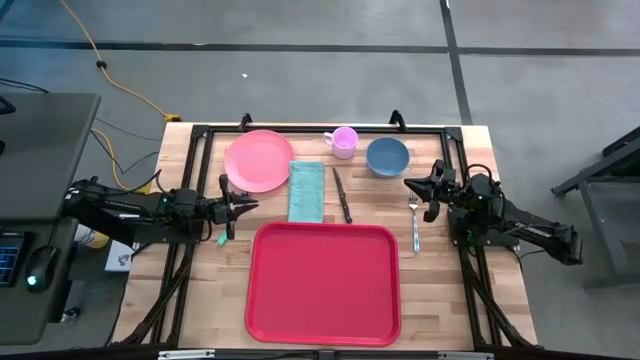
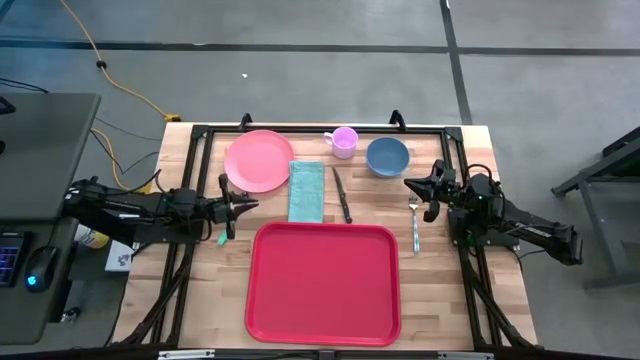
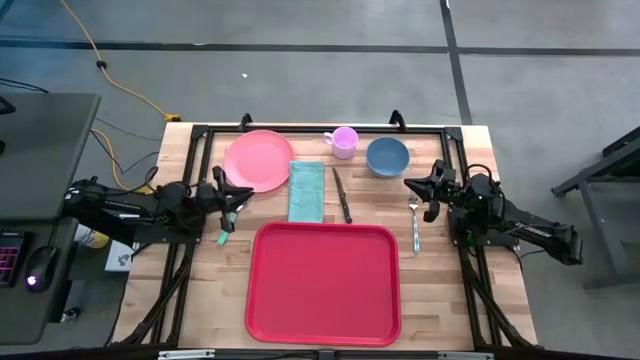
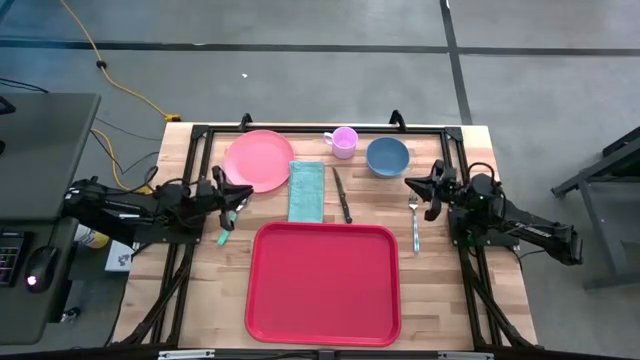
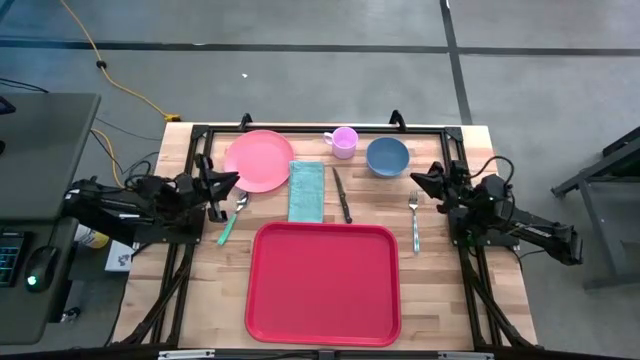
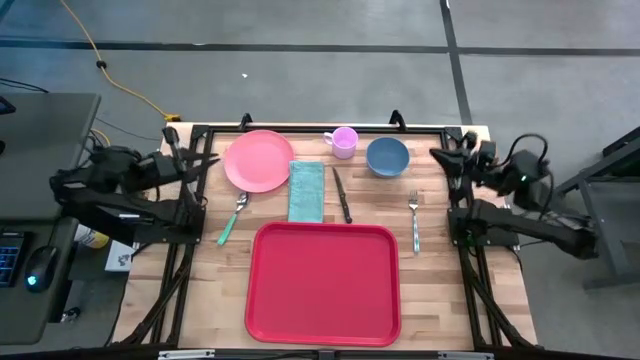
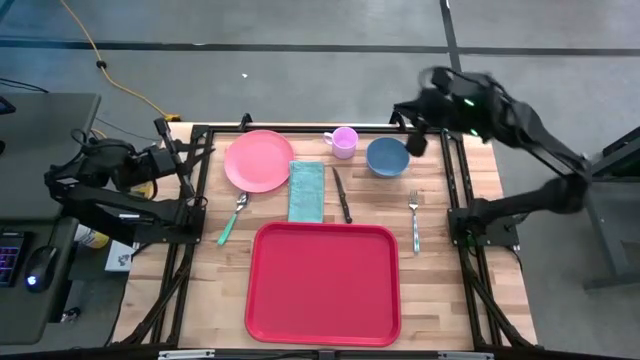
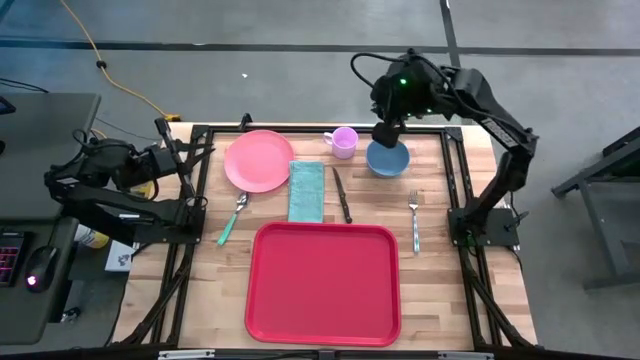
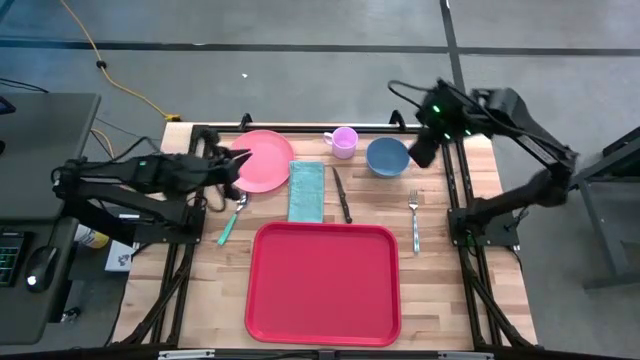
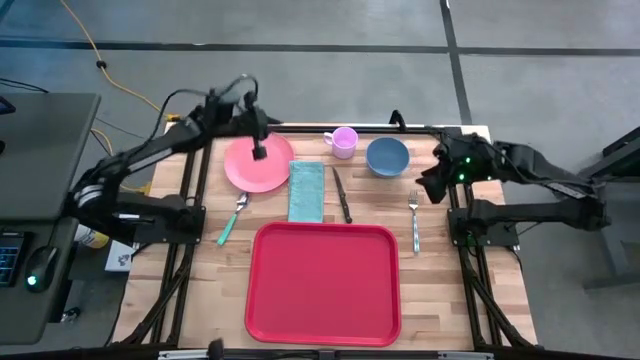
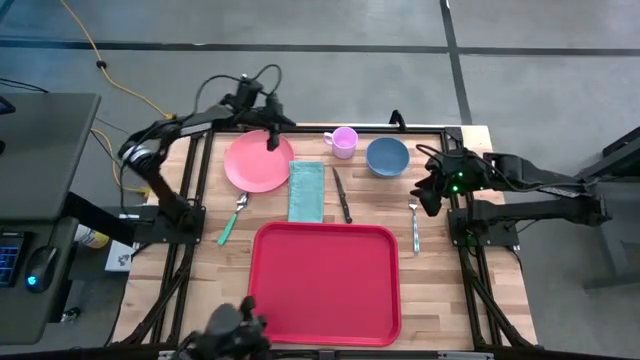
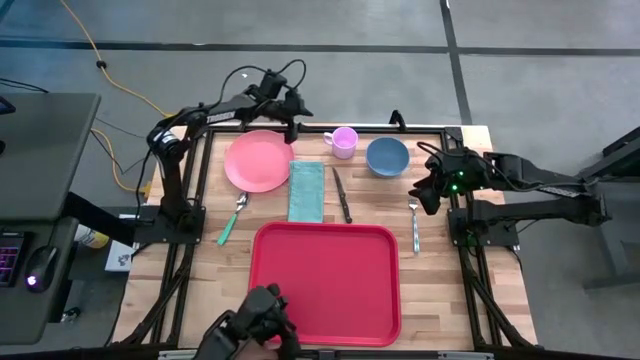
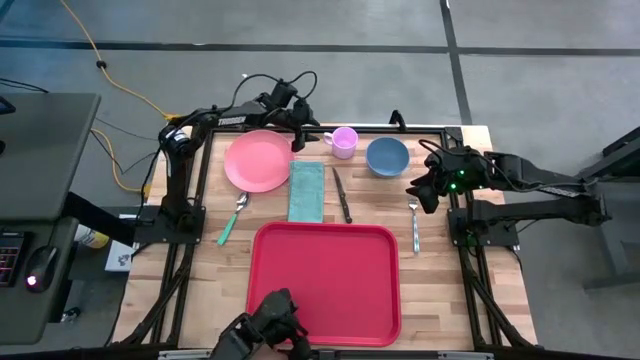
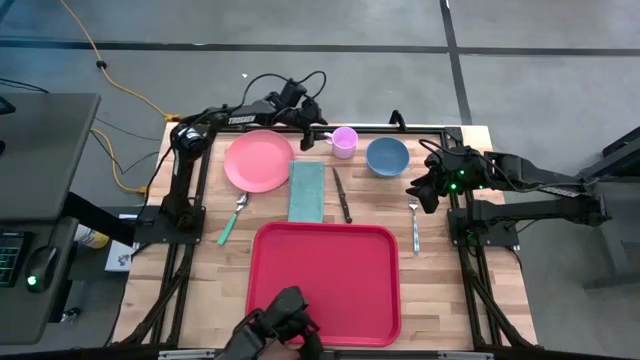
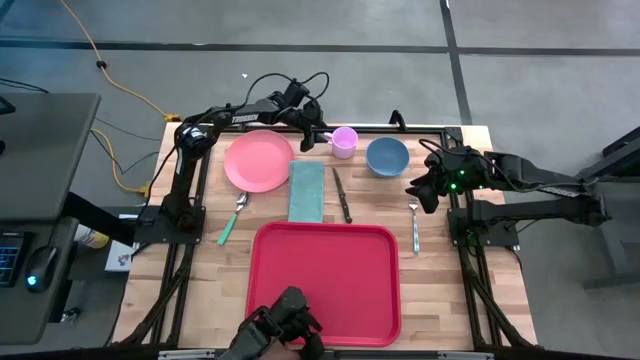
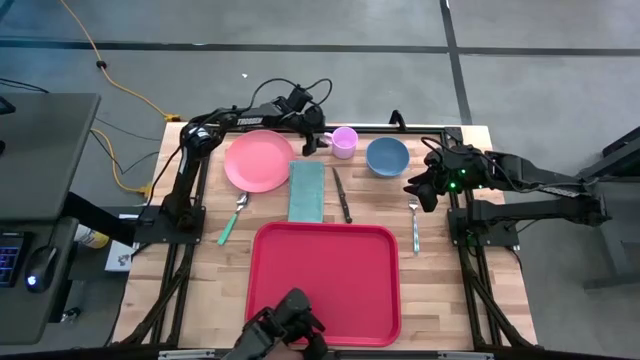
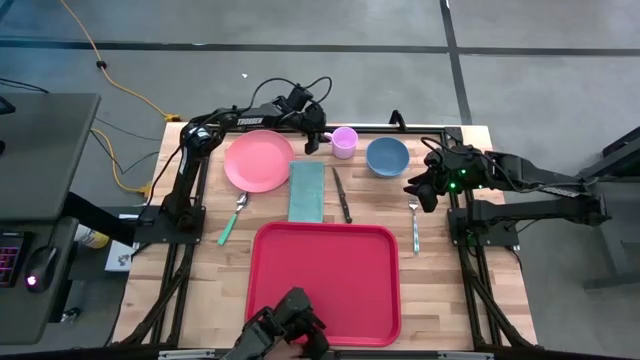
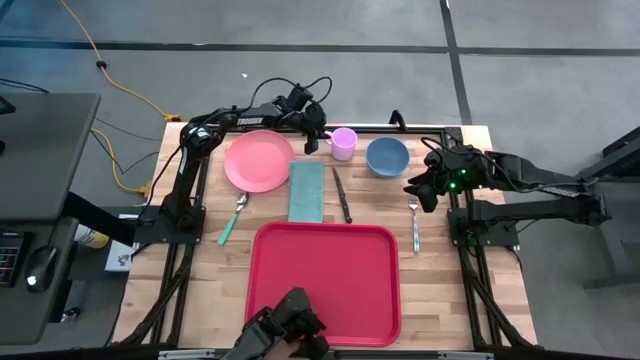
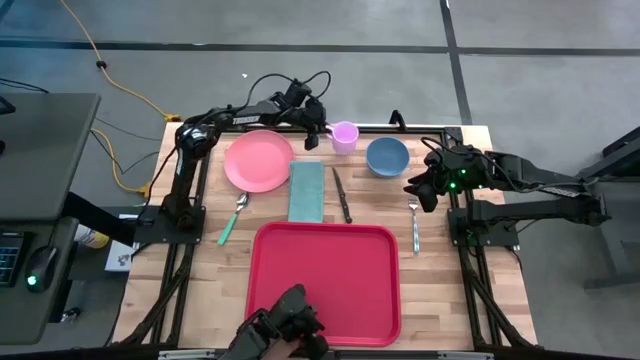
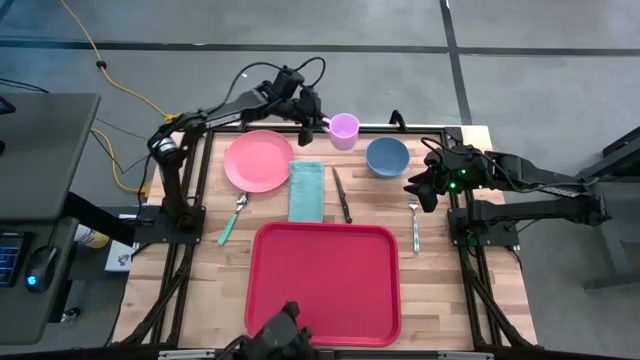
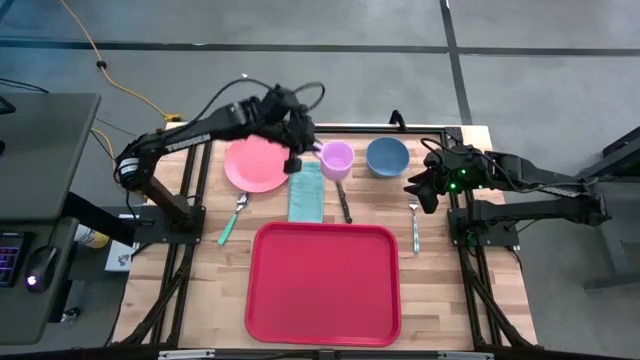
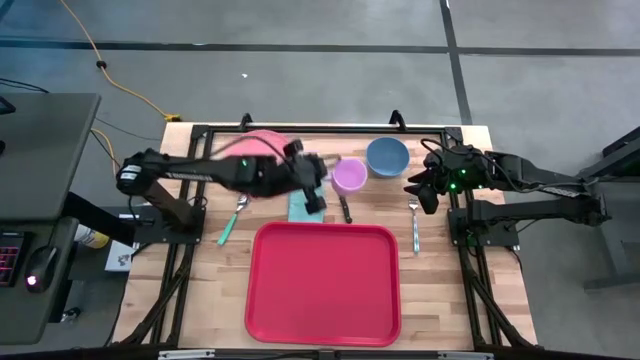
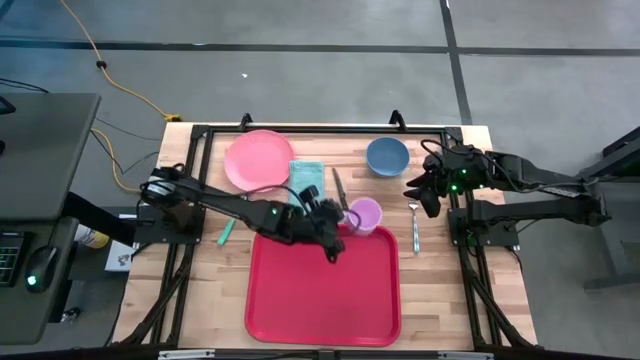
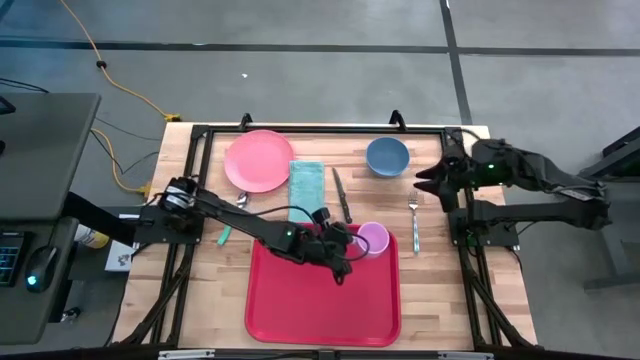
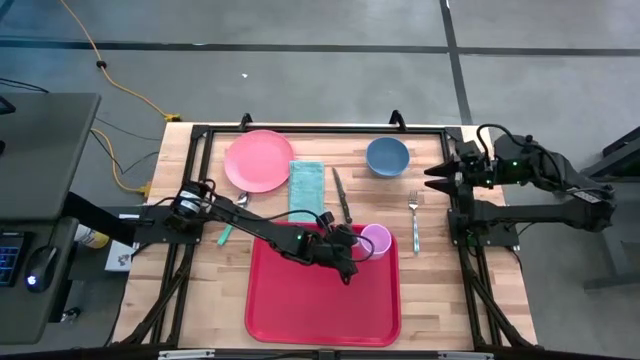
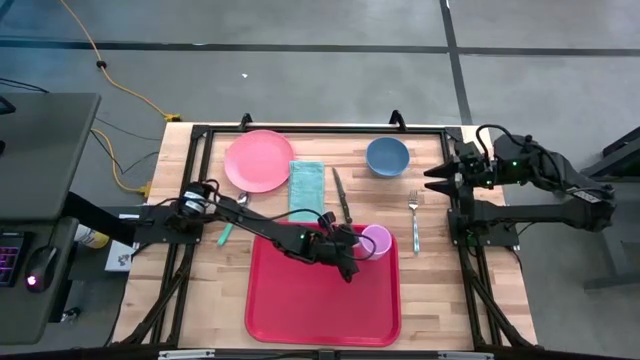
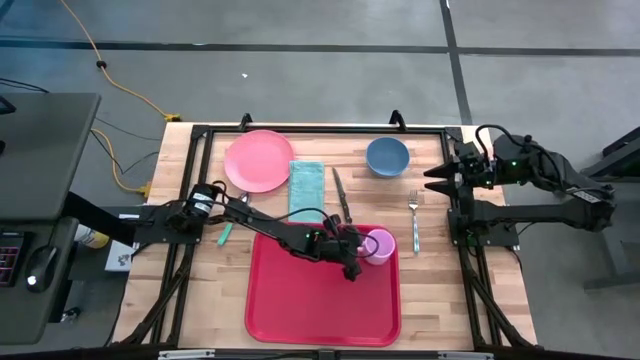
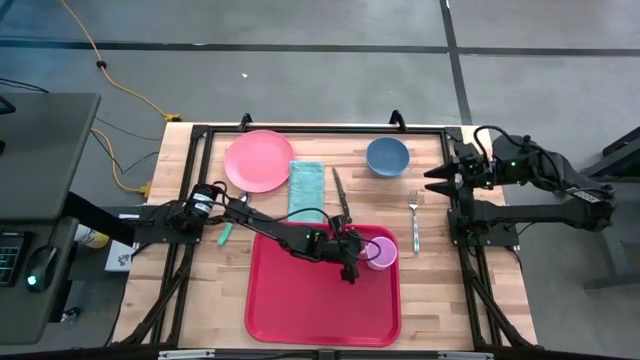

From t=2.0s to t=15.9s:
Task: Set up tray
Put the pink mug on the top right of the red serving tray

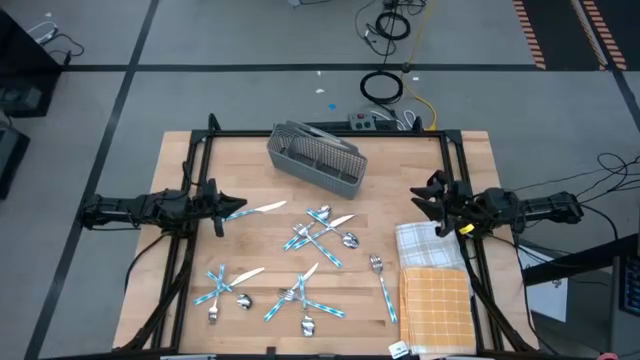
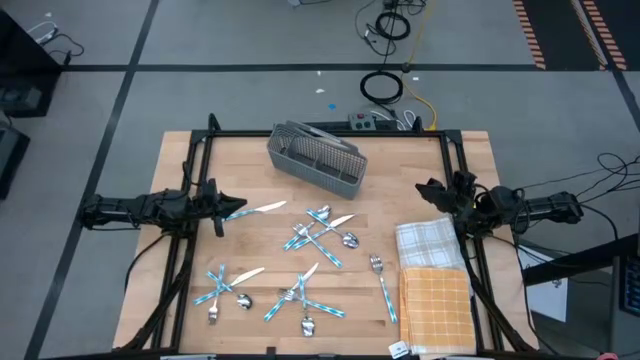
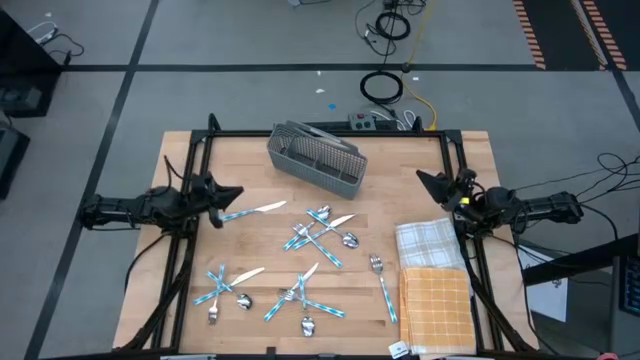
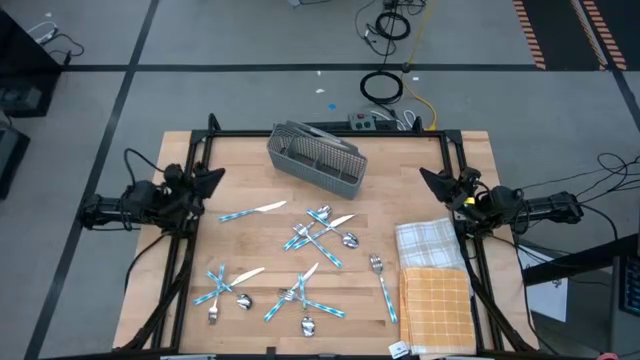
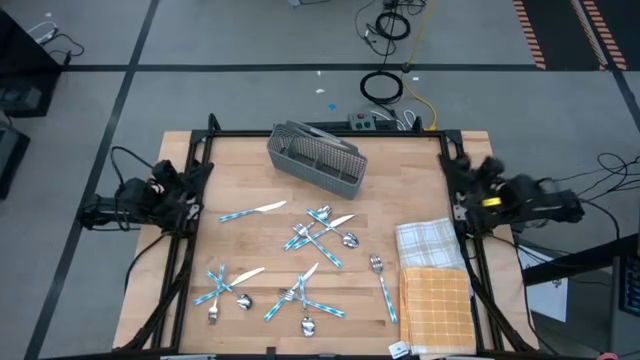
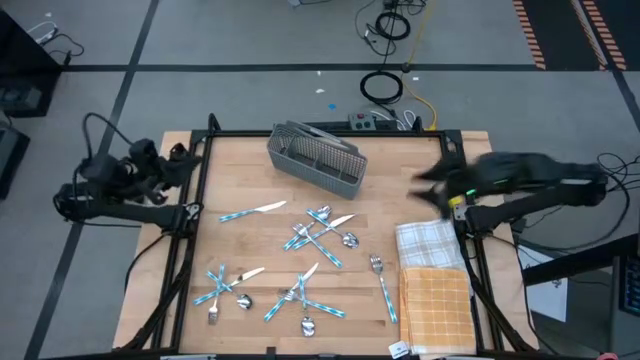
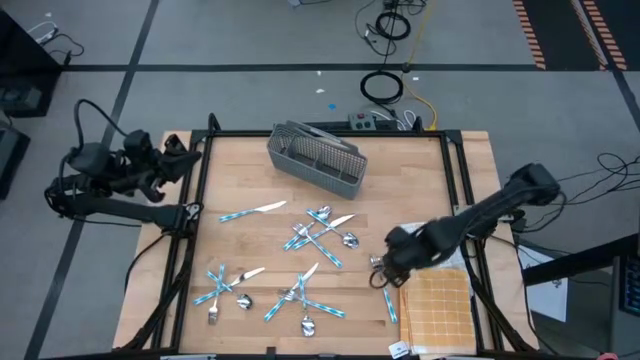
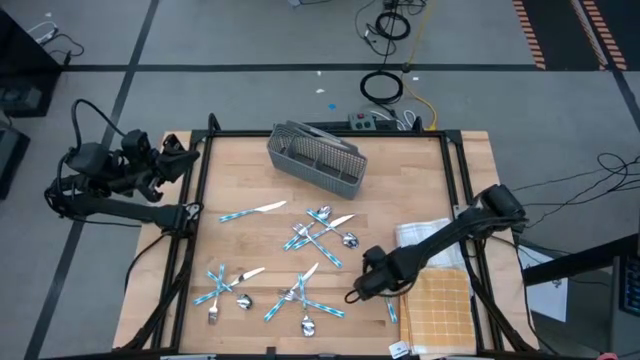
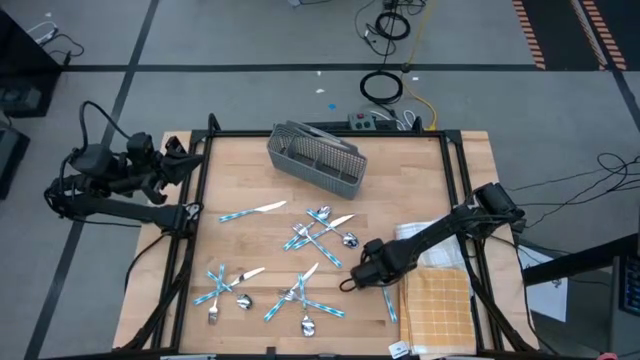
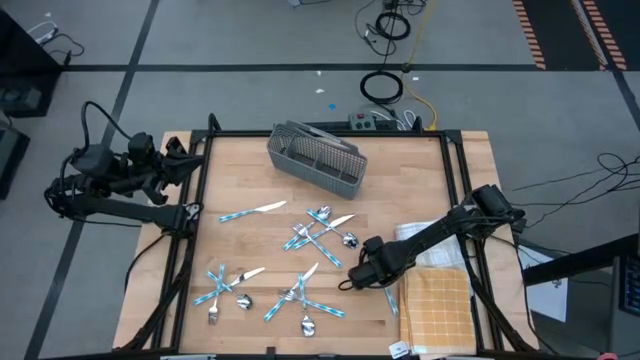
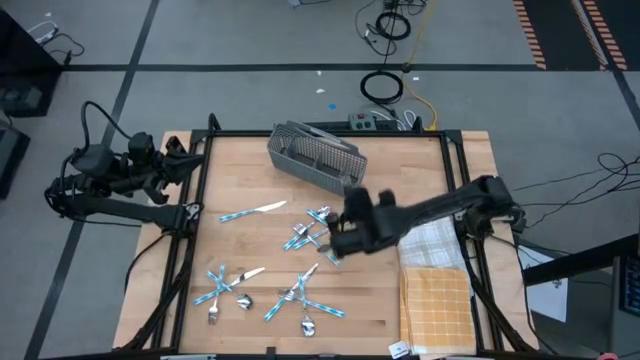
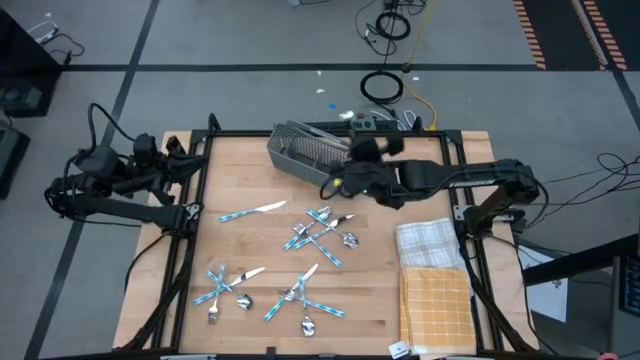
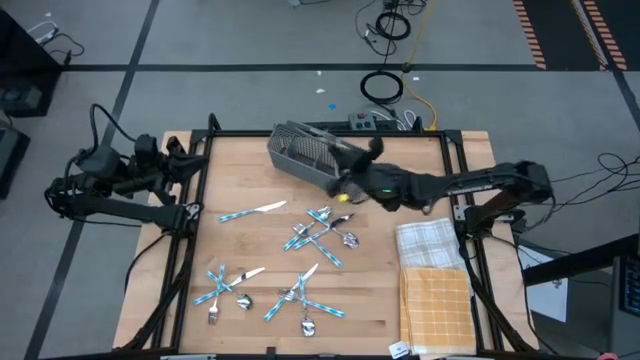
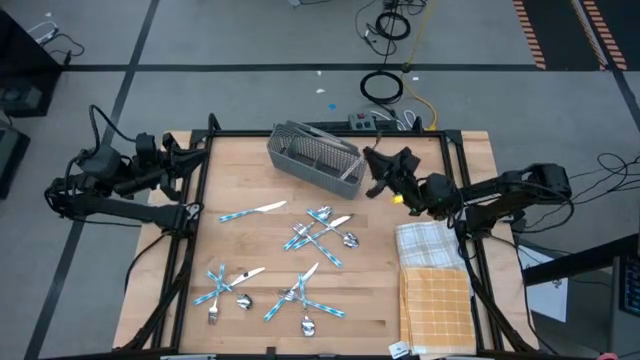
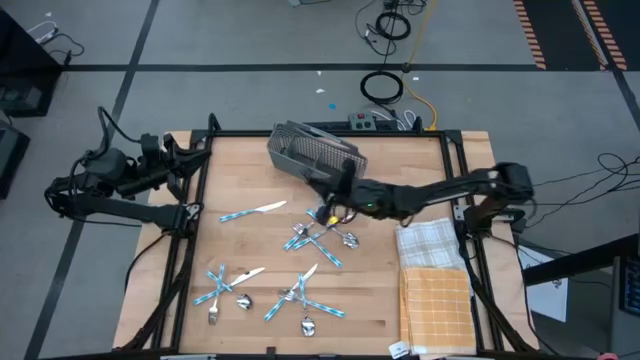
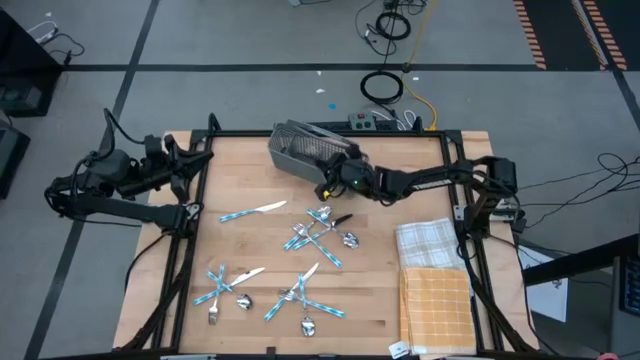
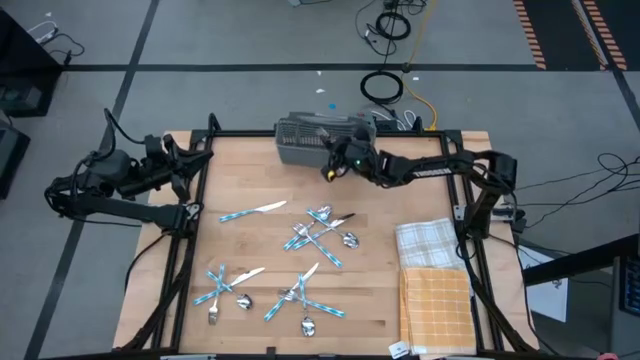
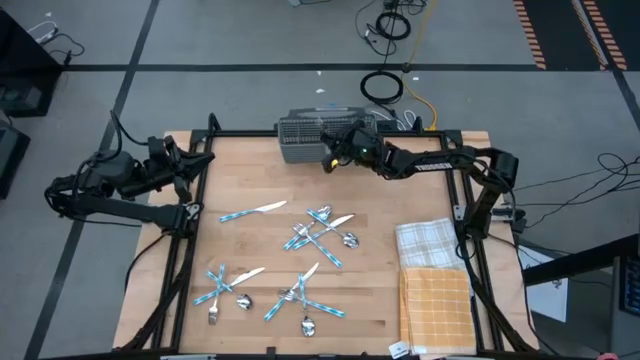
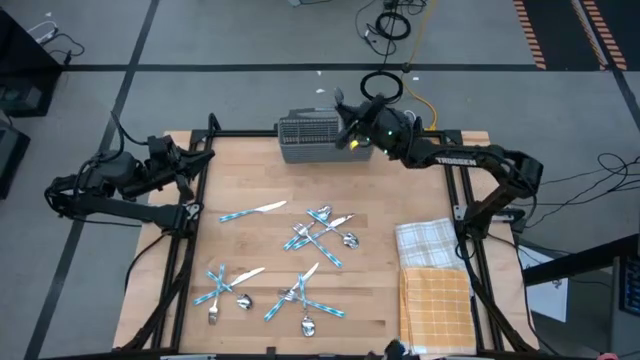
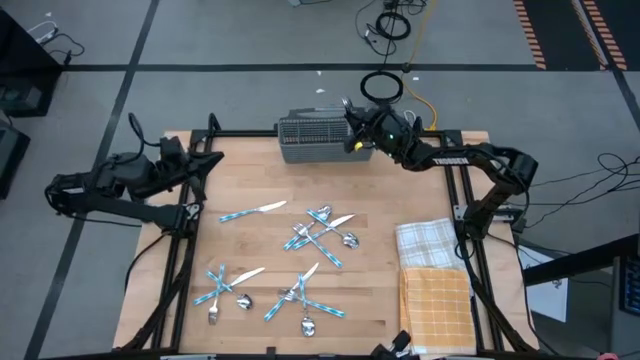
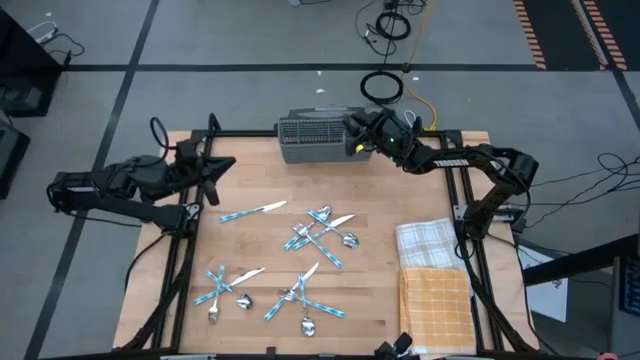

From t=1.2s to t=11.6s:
Task: Sort silverware
Put the fork into the silverware rack
